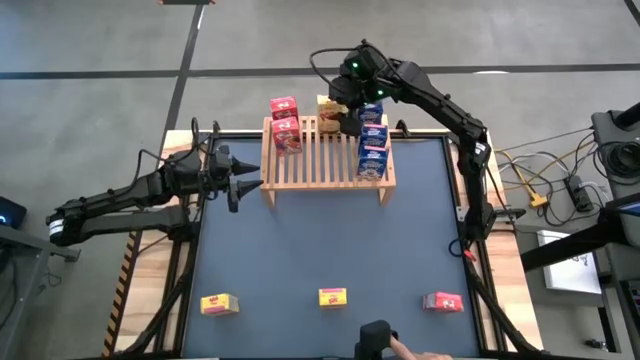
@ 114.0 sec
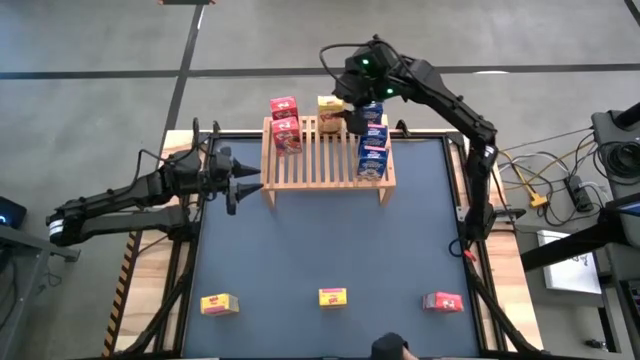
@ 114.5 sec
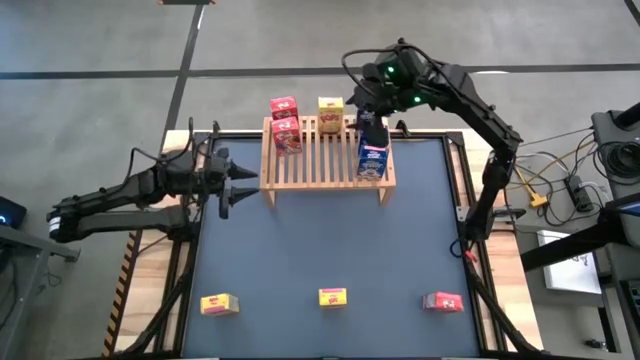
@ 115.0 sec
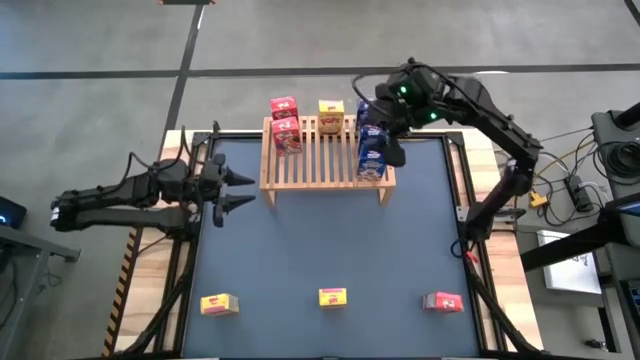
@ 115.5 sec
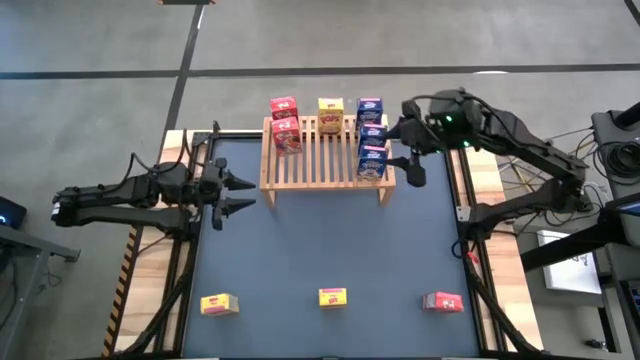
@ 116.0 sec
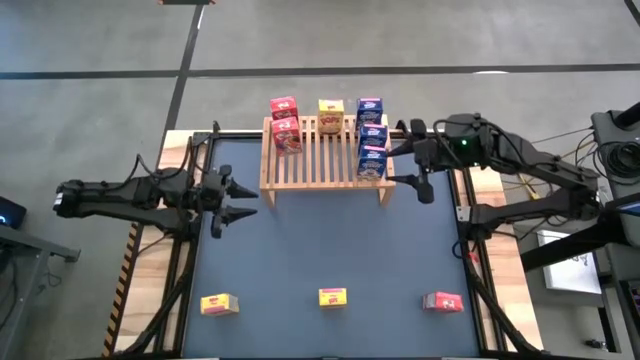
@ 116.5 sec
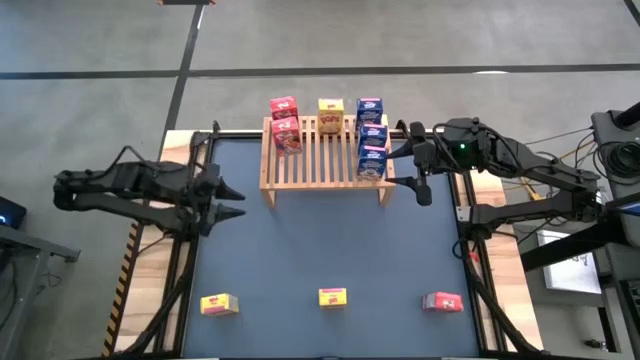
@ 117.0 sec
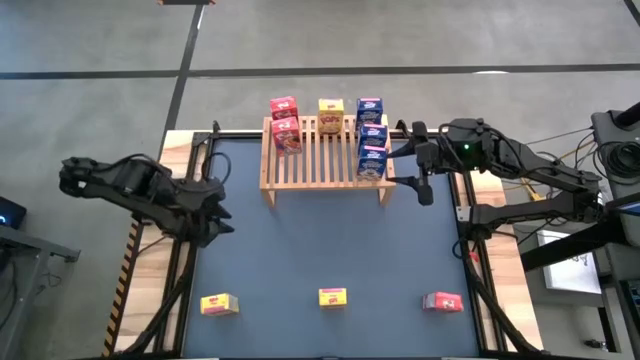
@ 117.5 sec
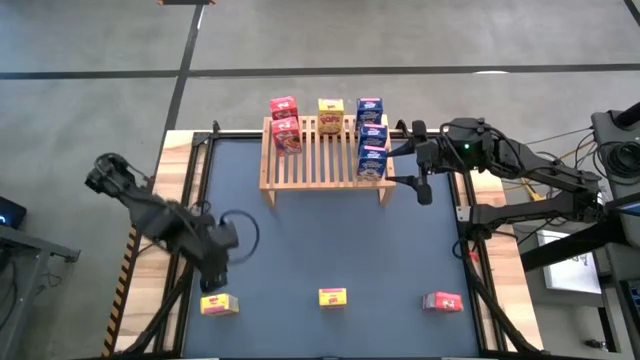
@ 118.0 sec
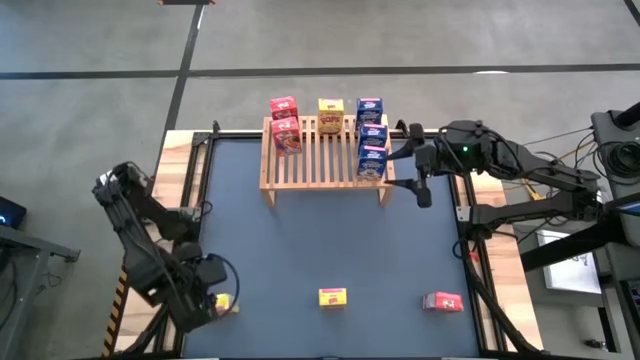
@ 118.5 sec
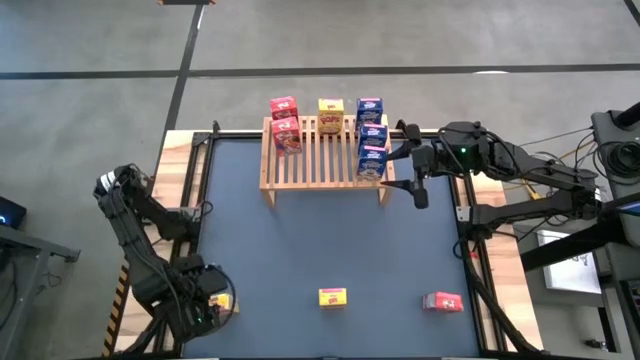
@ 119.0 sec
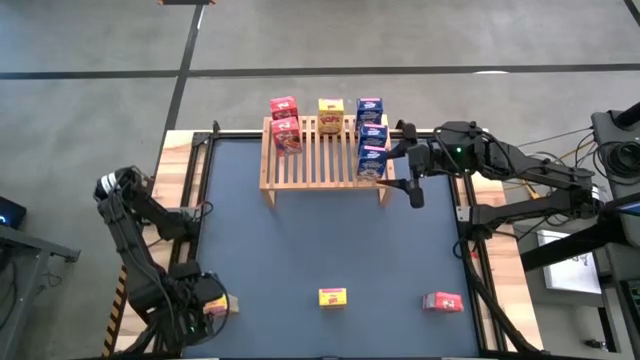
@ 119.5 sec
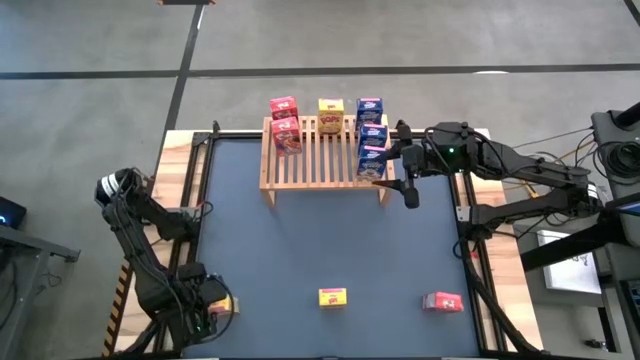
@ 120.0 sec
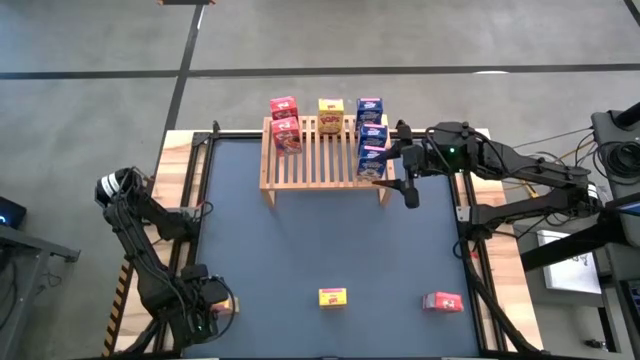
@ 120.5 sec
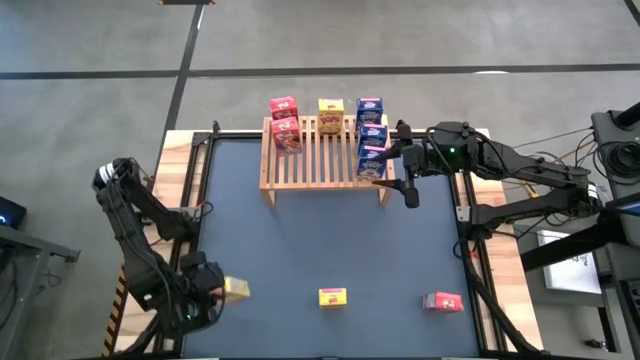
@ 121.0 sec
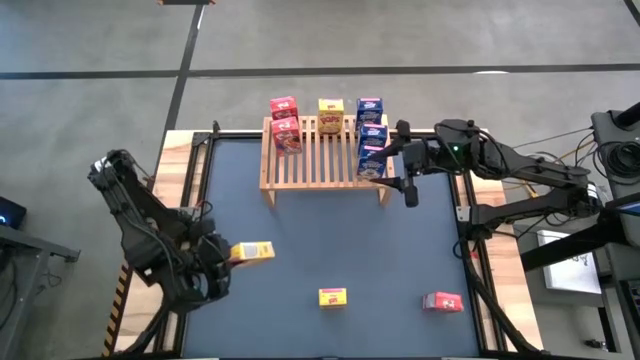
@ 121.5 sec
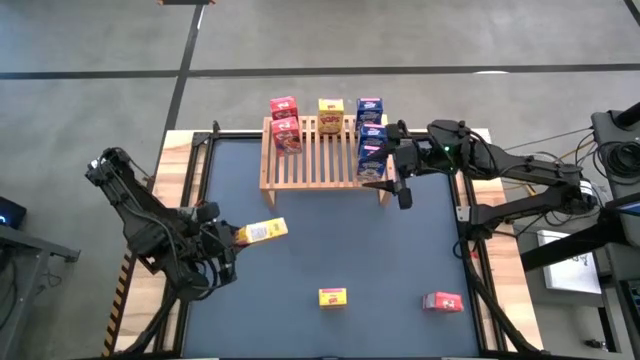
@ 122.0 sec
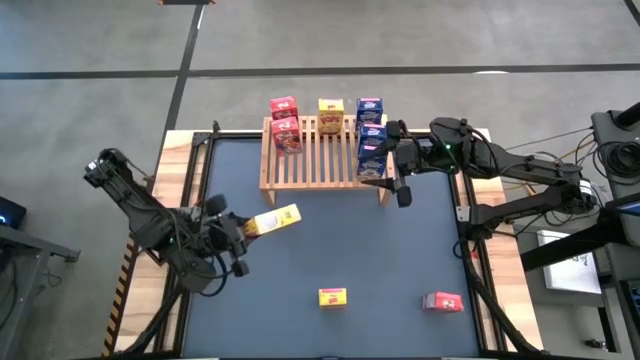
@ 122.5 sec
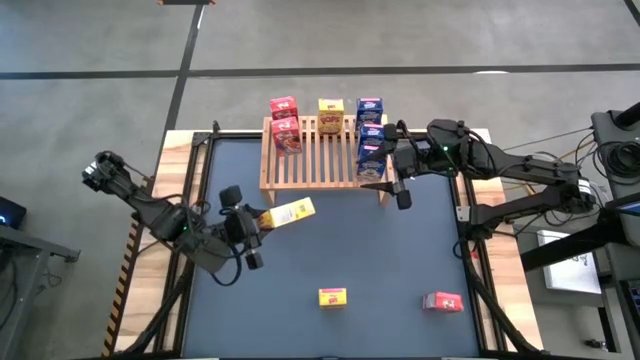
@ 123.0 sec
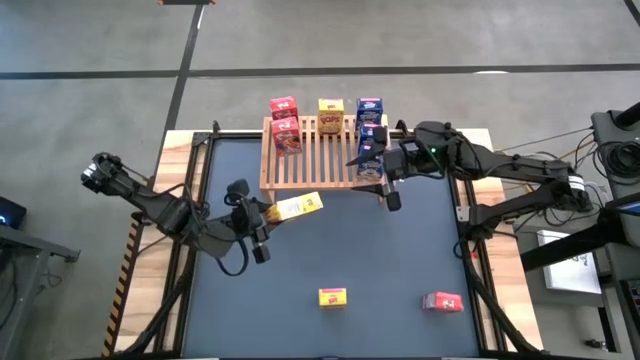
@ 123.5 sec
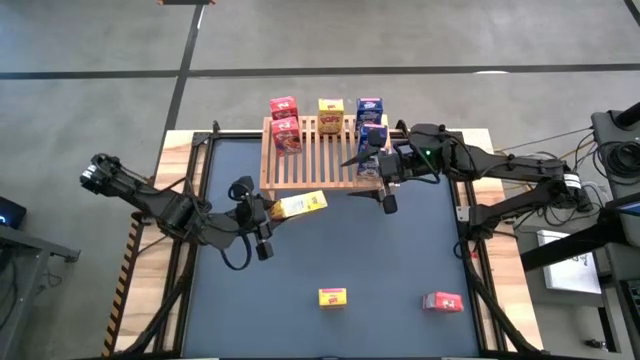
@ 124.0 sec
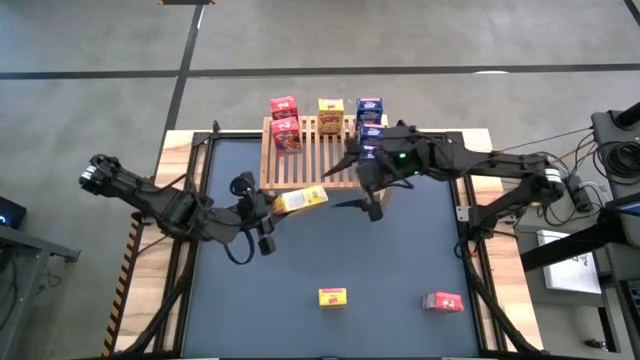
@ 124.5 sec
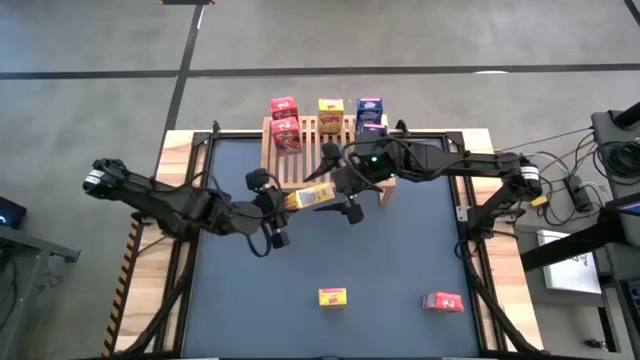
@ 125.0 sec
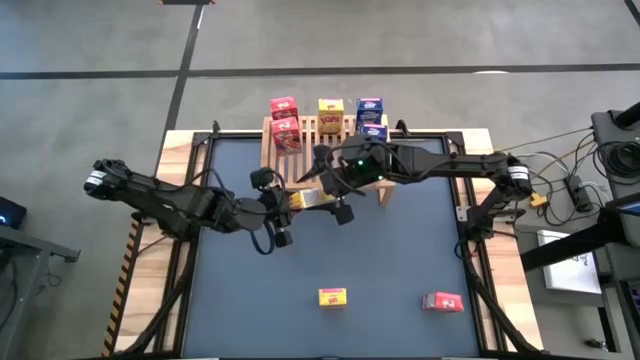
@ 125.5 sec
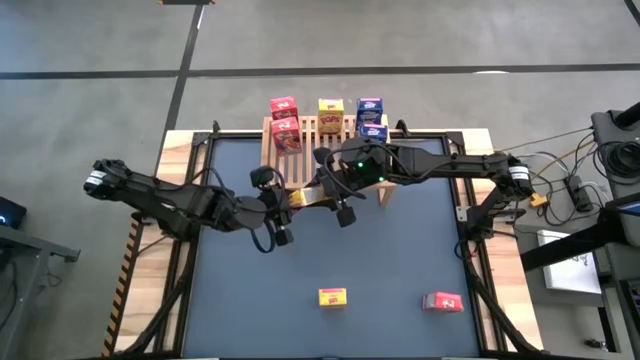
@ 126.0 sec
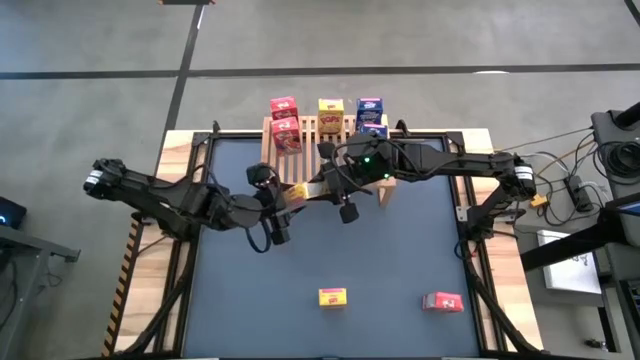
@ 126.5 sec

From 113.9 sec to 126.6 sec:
Task: Stack cereal on shelf
Put the left yellow cereal box on the shelf aligned with the yellow cereal box

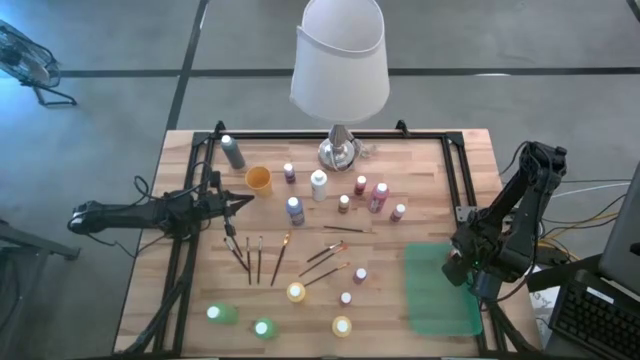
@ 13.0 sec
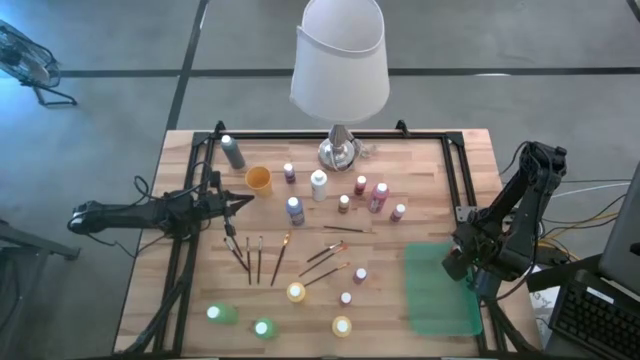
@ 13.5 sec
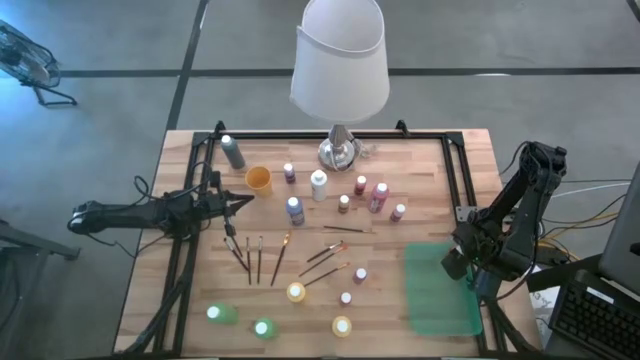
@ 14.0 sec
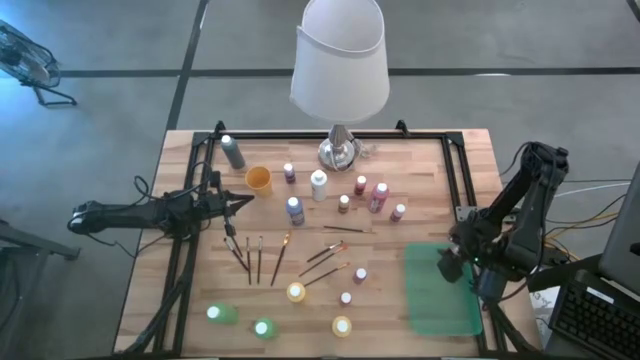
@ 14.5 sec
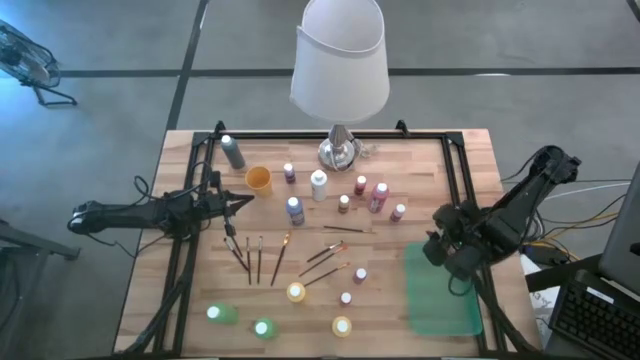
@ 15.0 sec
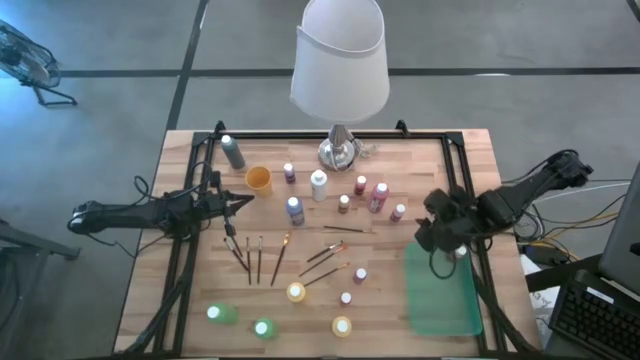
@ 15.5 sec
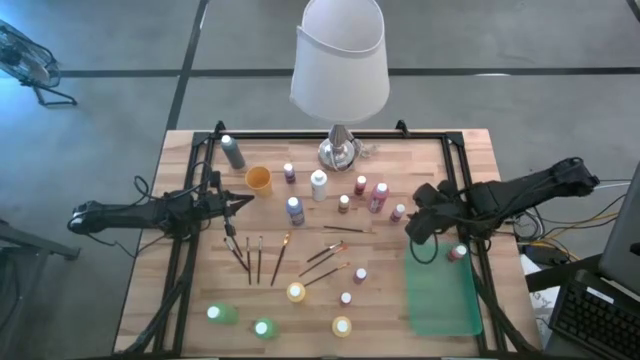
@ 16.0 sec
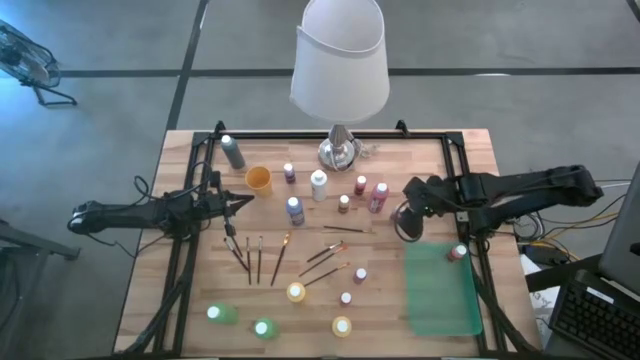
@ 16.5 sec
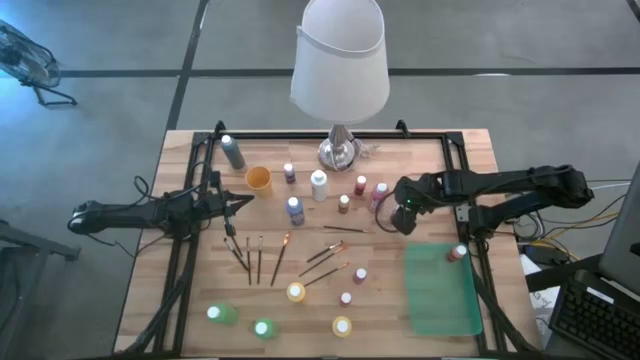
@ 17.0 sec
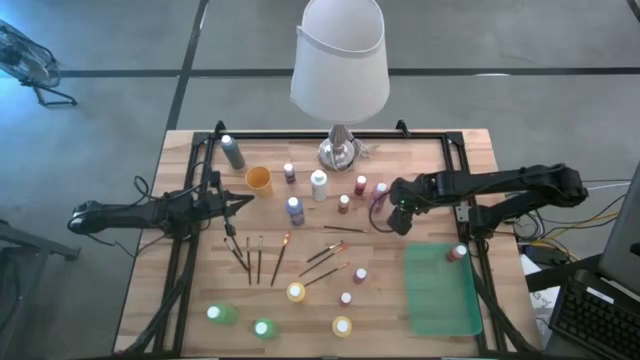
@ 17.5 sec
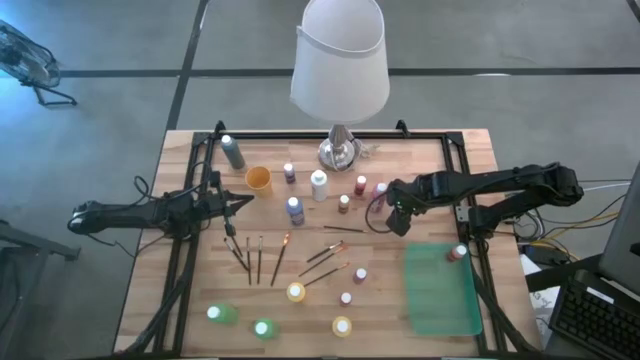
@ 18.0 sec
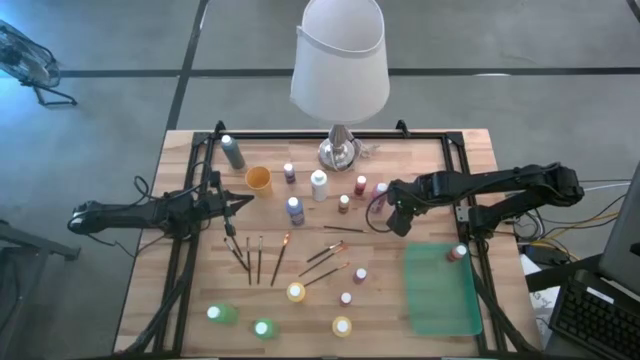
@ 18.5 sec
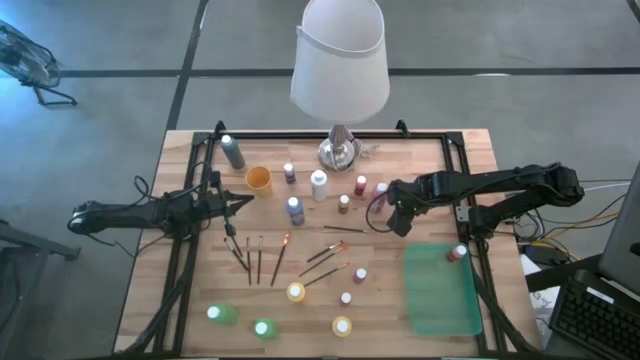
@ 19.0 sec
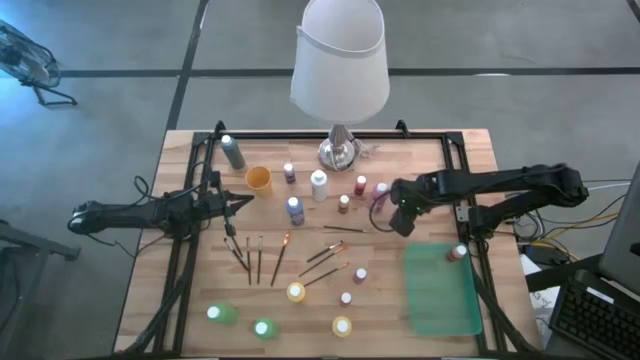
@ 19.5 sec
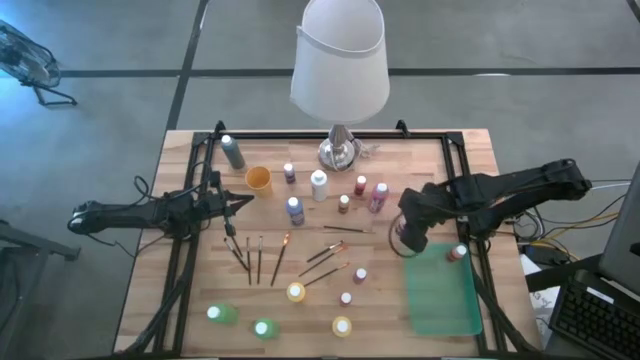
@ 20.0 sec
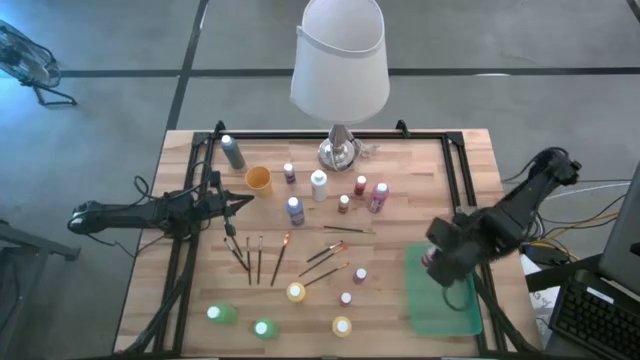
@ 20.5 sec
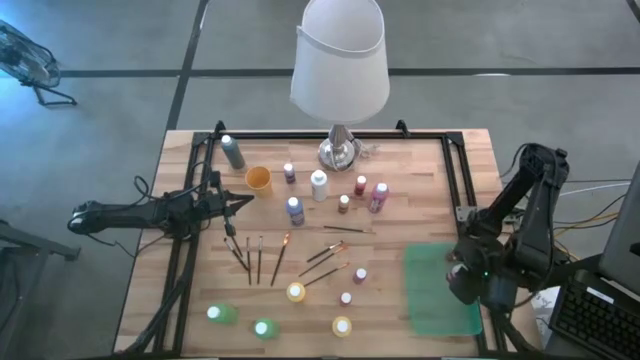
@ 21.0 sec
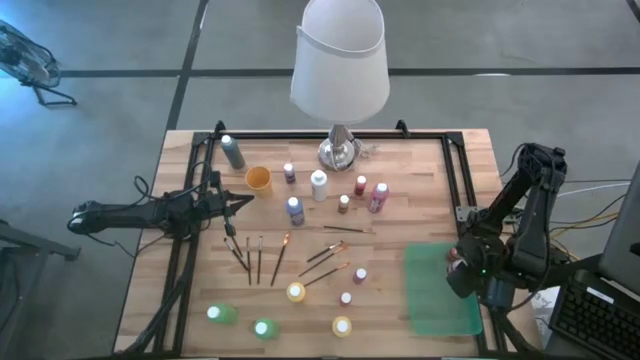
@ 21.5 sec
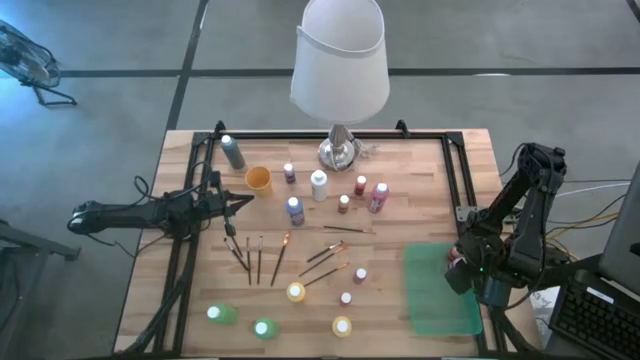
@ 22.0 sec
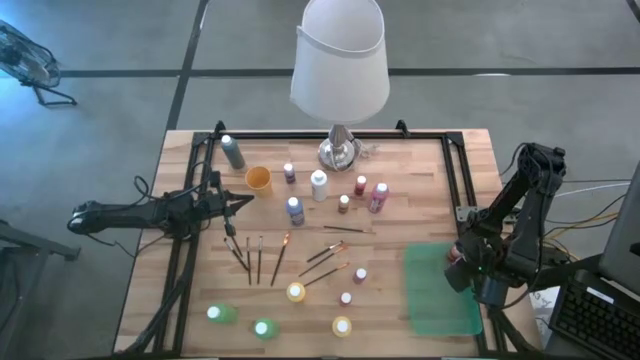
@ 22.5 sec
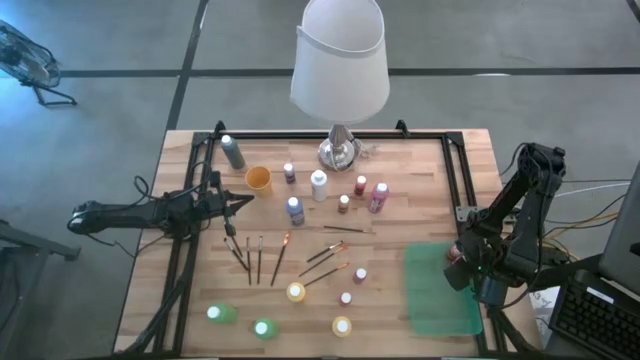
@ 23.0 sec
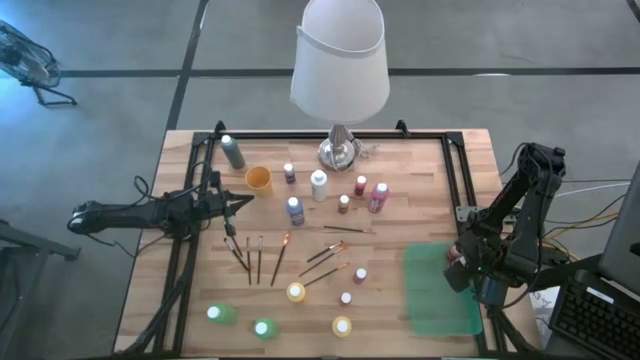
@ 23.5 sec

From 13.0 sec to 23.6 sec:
Task: Pick & Place Paint Supplies
Put the light pink paint bottle into the green bin
